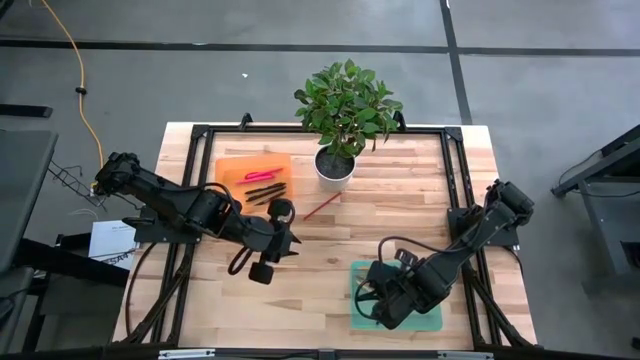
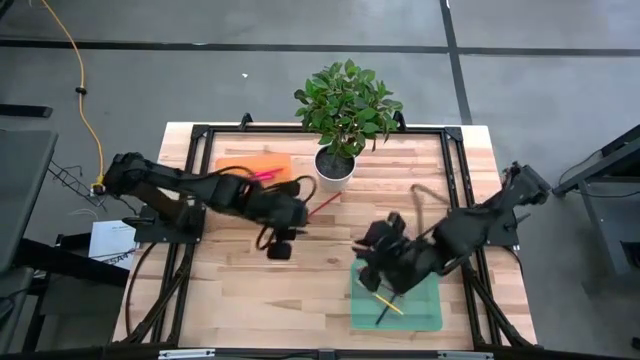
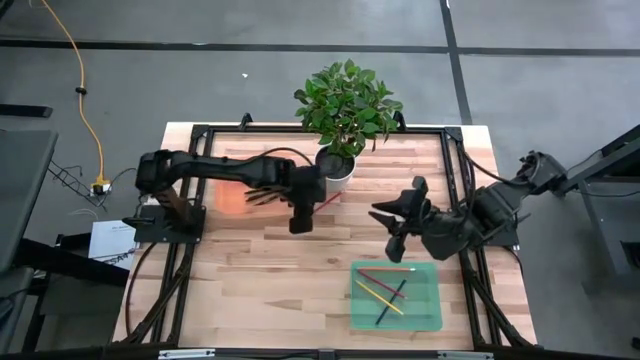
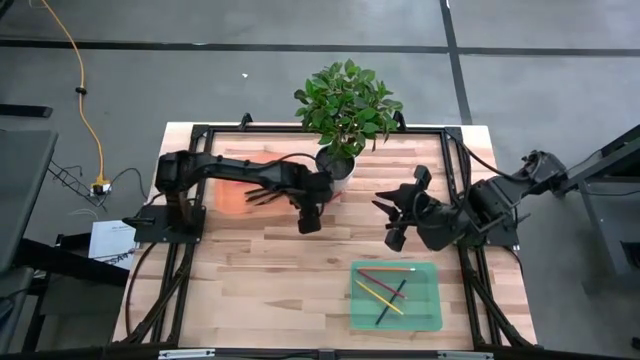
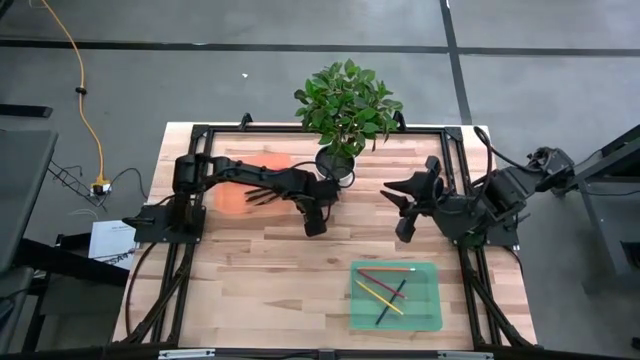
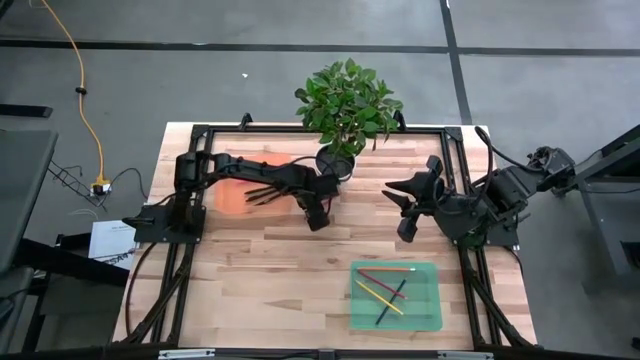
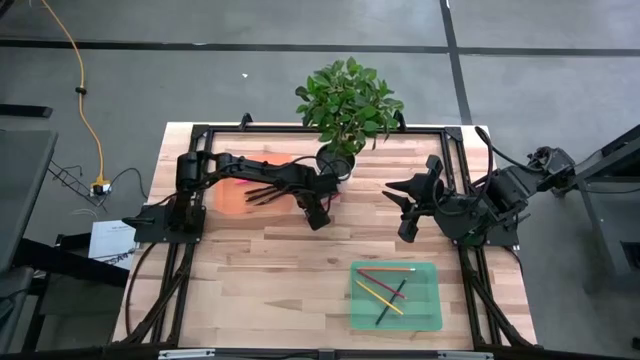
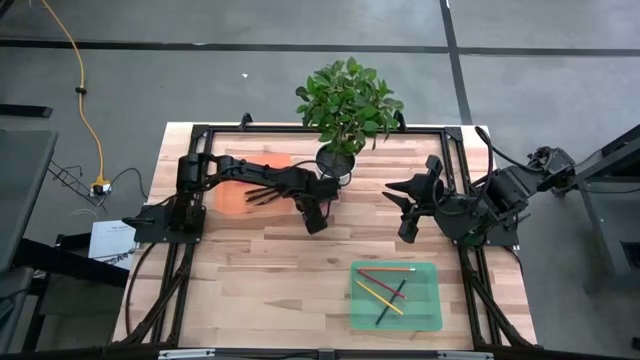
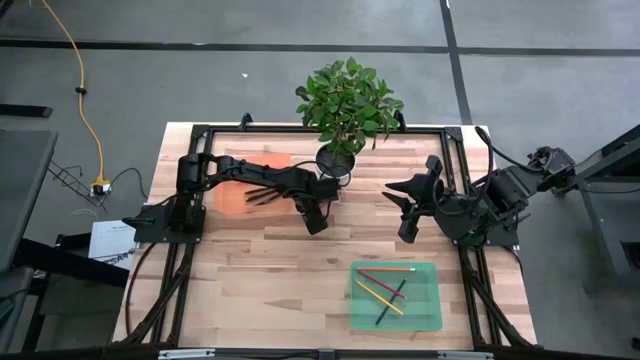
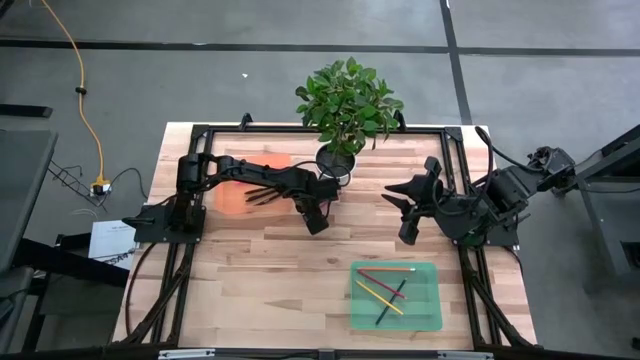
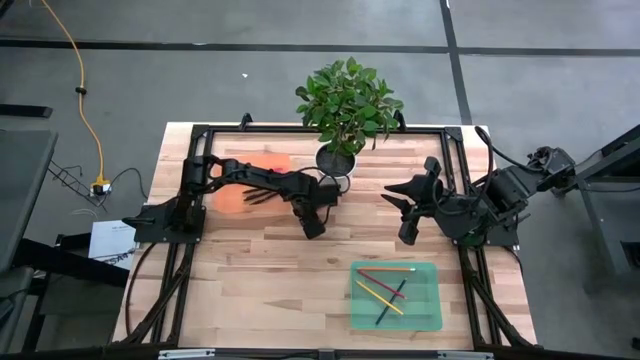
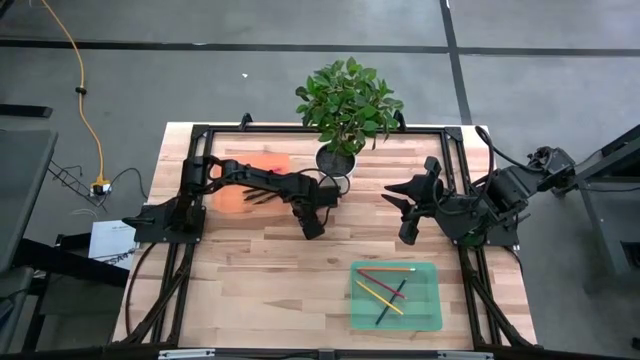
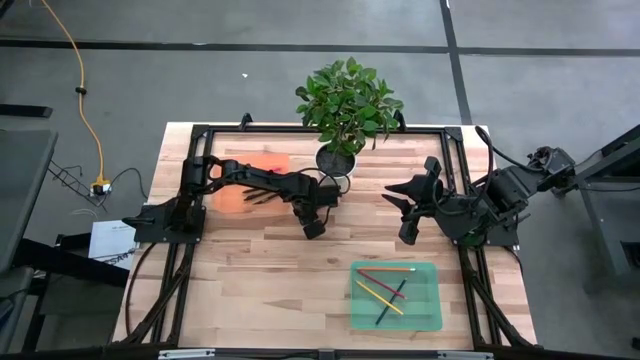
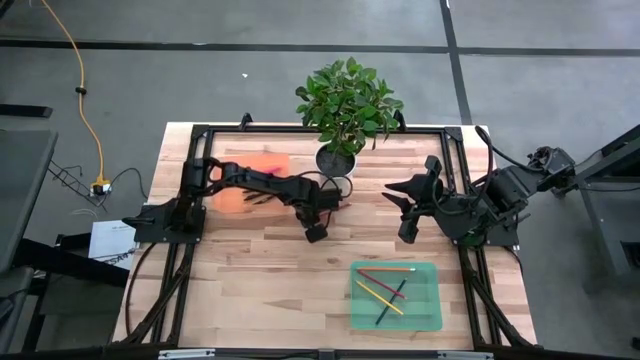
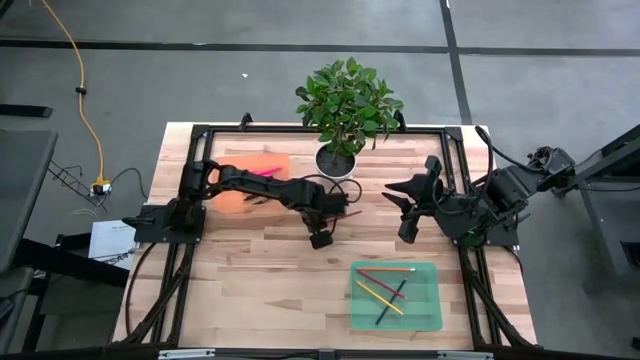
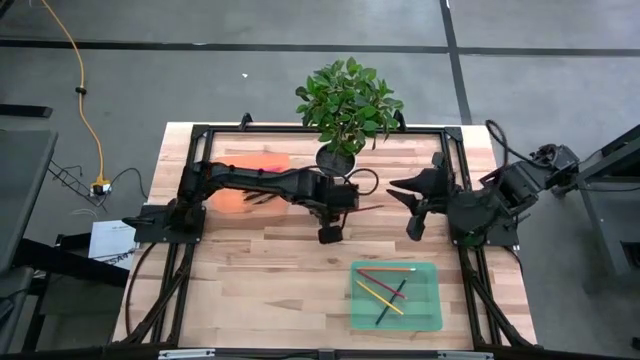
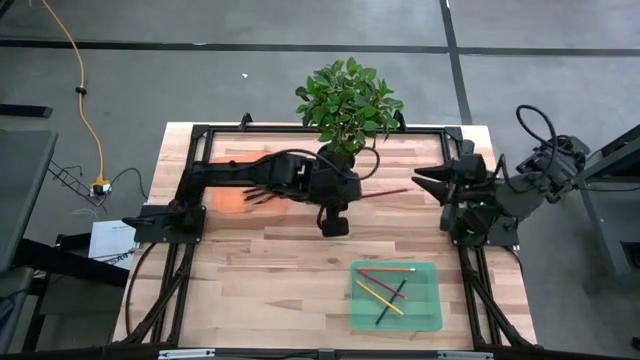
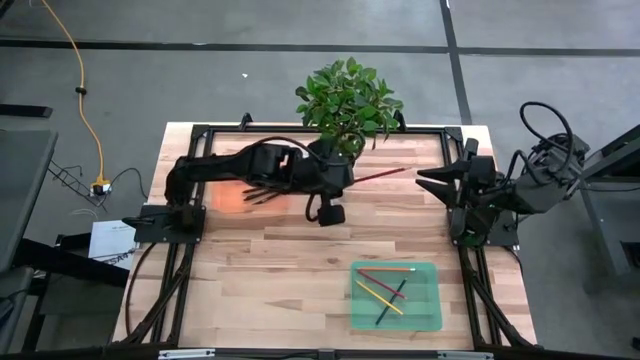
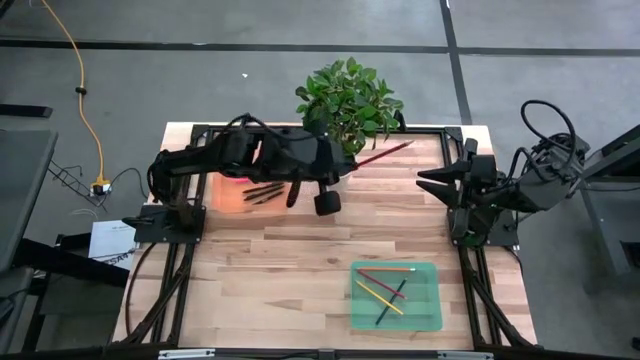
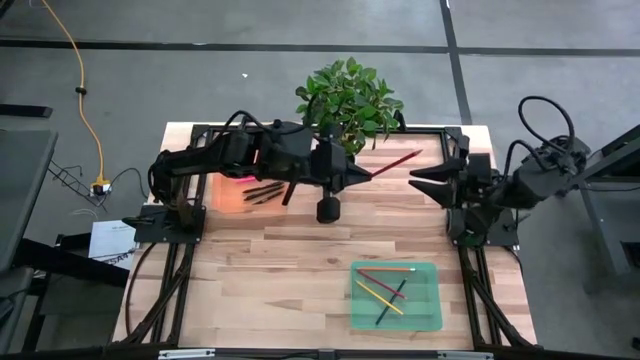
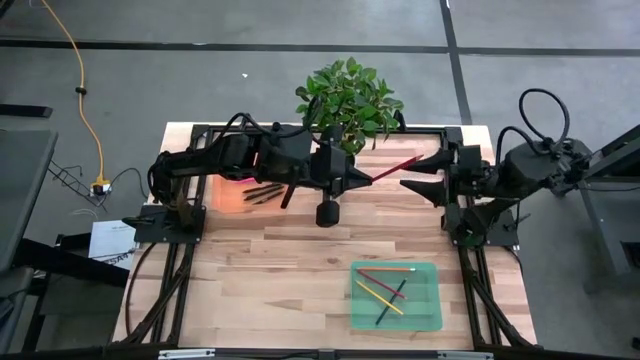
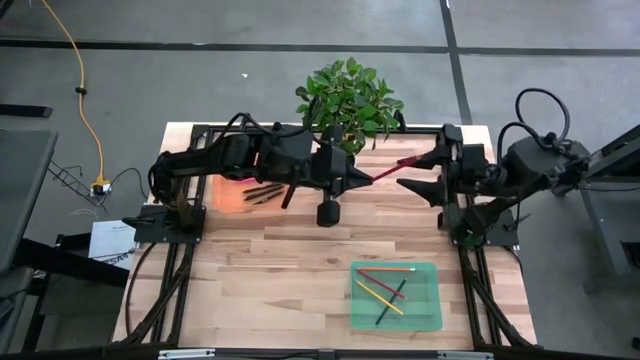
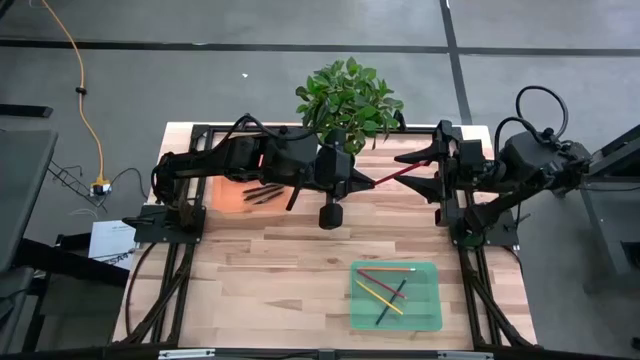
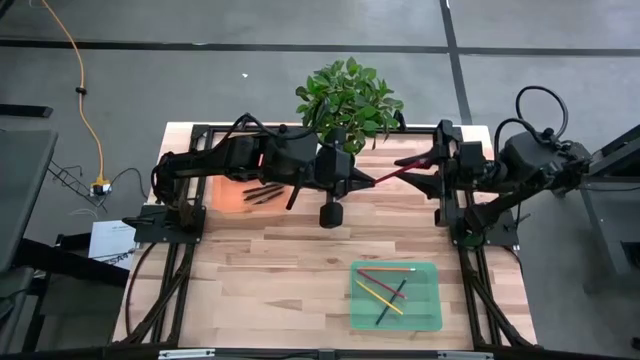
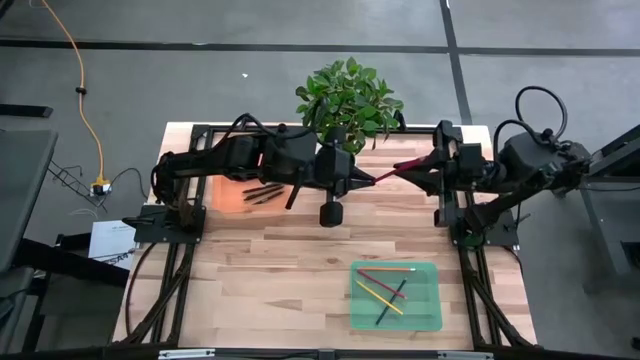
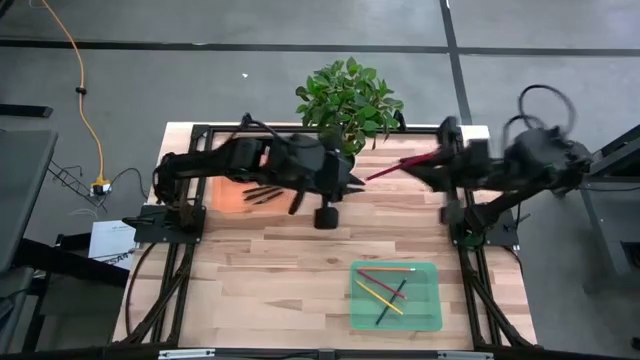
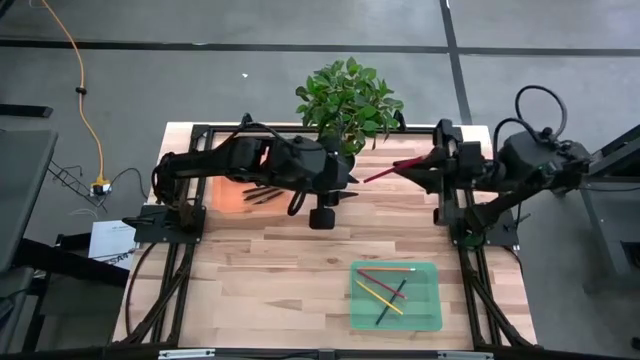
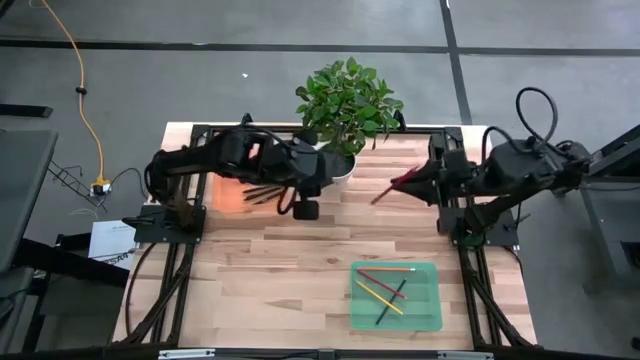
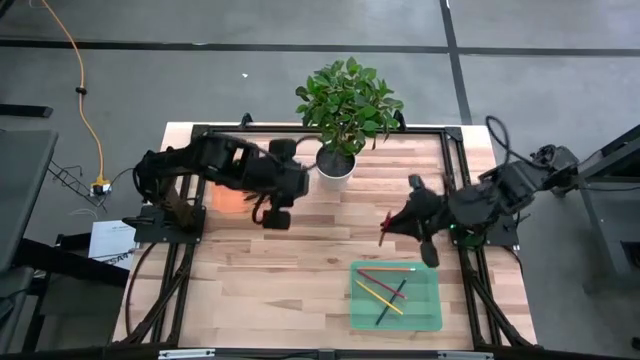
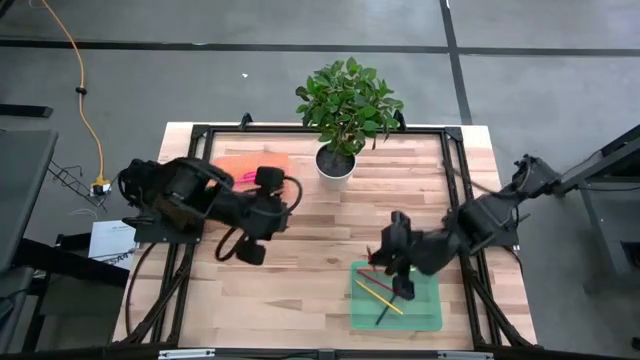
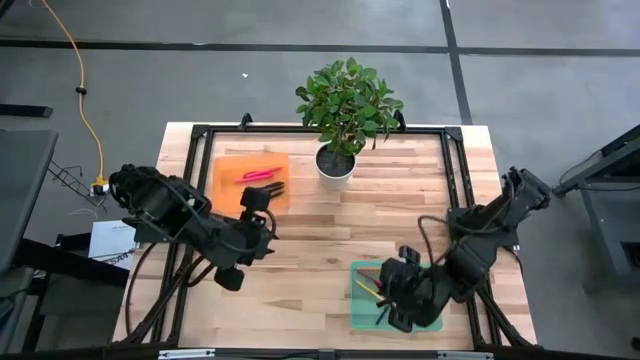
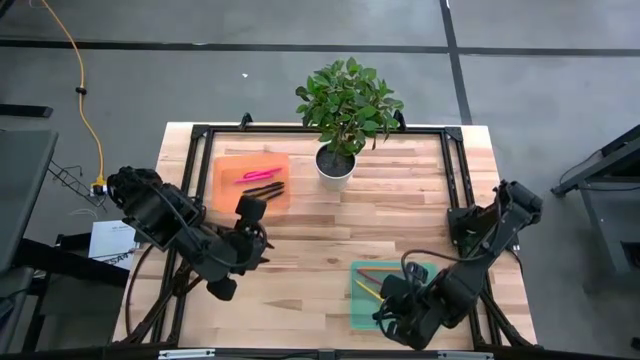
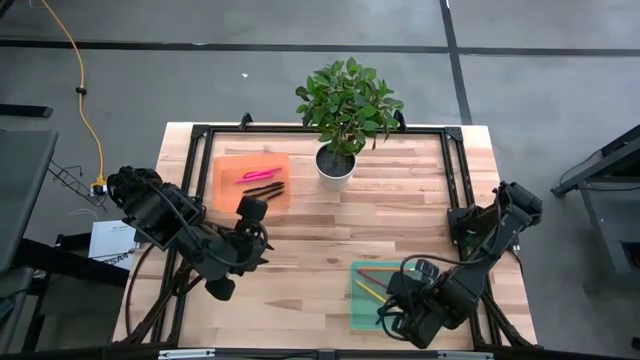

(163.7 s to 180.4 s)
Task: Sort pens & pencils
Put the red colored pencil into the green bin
